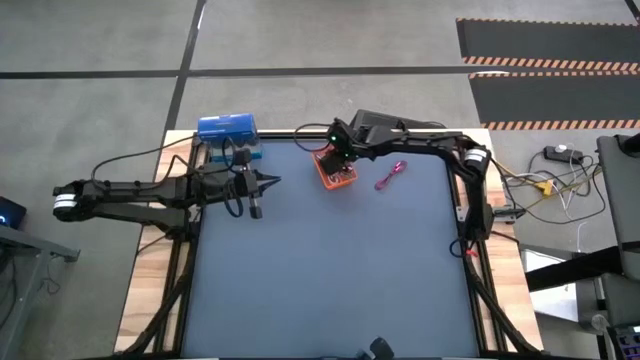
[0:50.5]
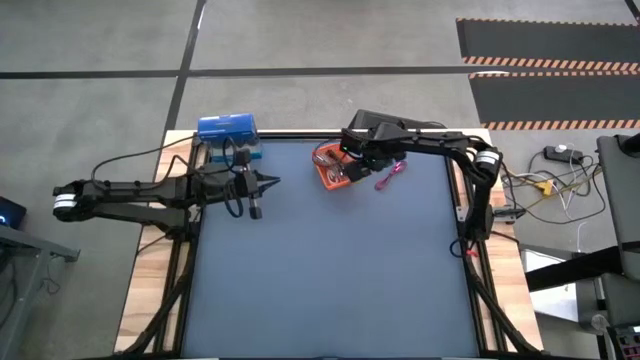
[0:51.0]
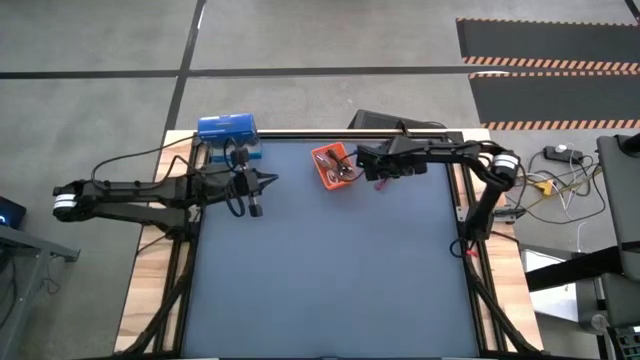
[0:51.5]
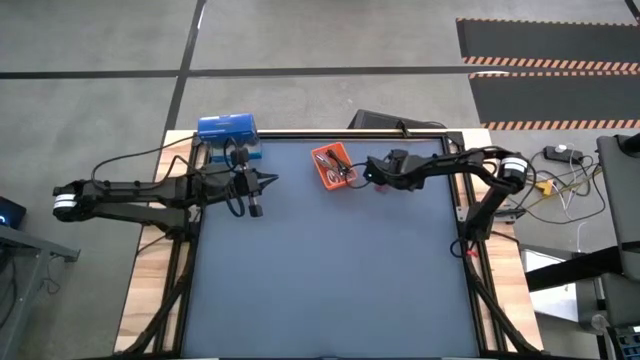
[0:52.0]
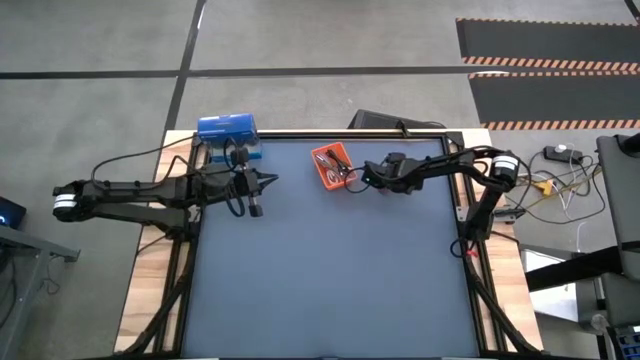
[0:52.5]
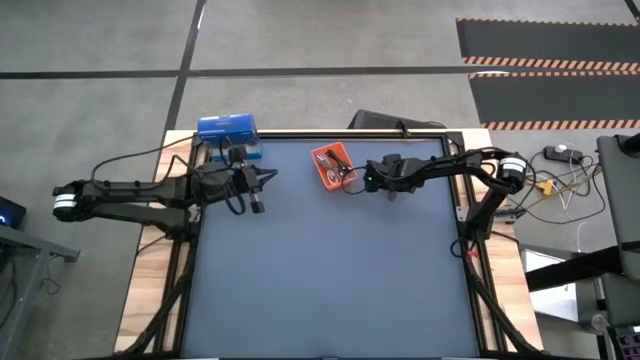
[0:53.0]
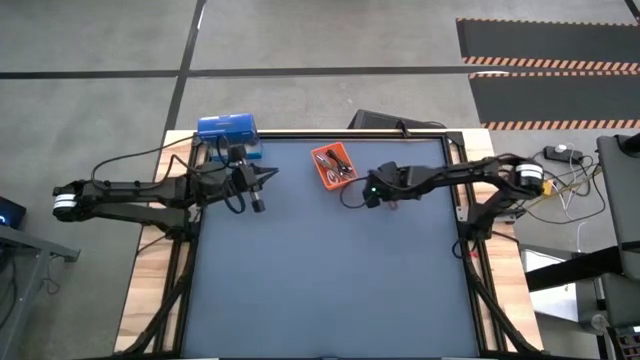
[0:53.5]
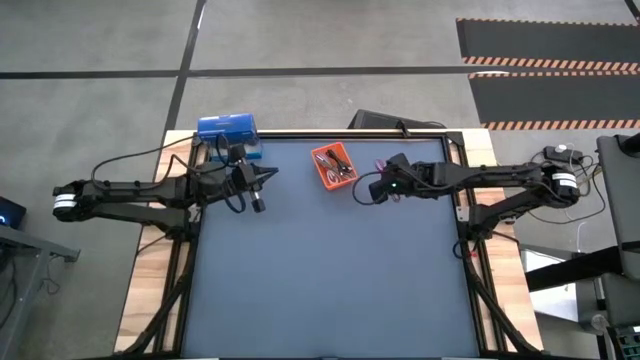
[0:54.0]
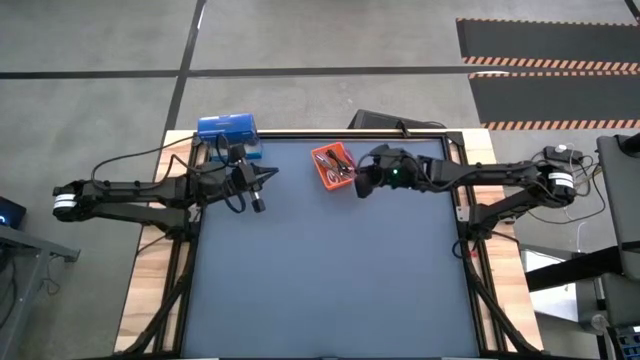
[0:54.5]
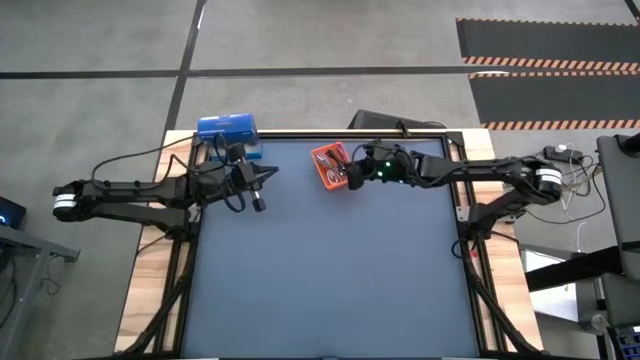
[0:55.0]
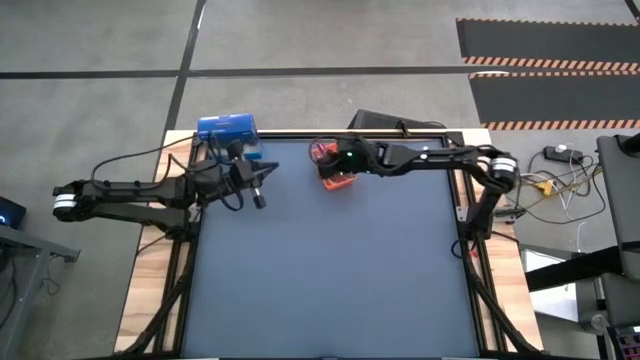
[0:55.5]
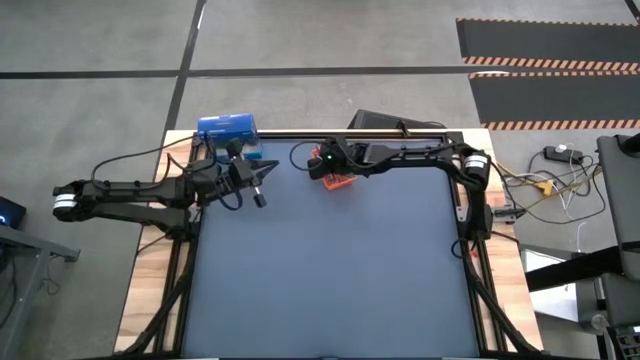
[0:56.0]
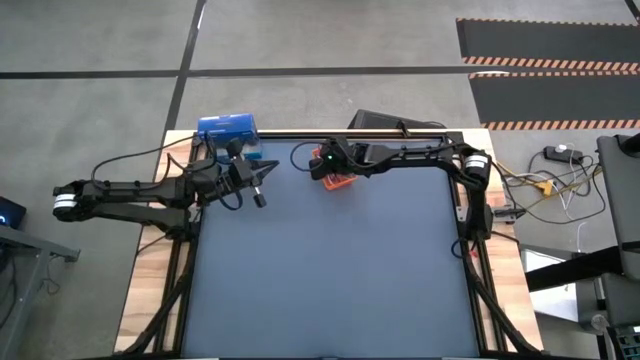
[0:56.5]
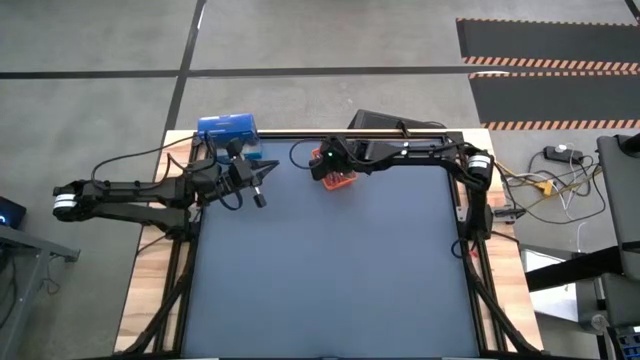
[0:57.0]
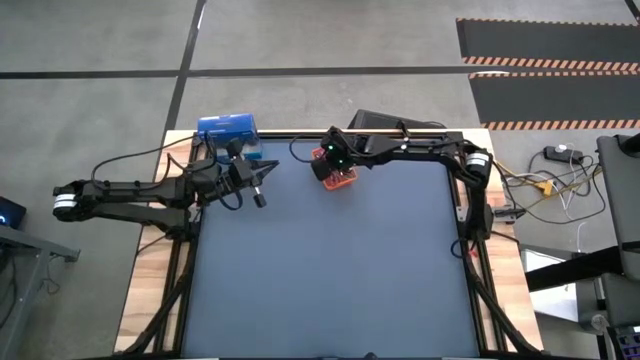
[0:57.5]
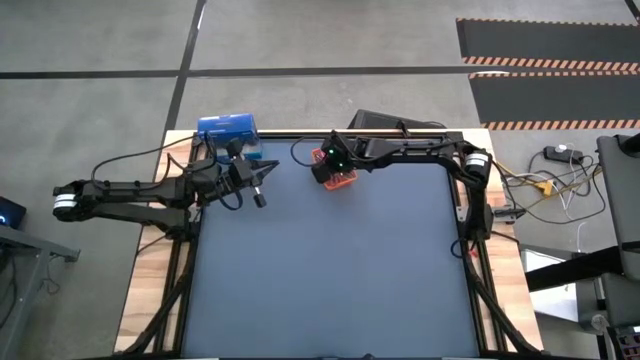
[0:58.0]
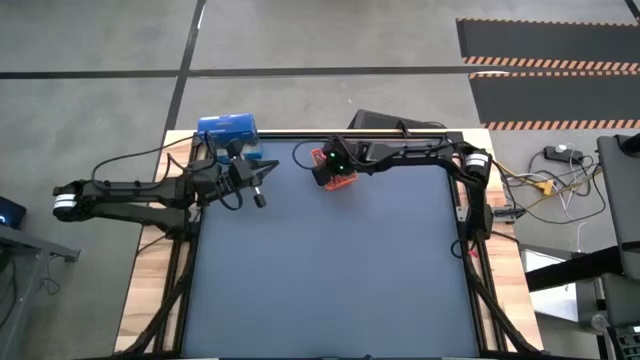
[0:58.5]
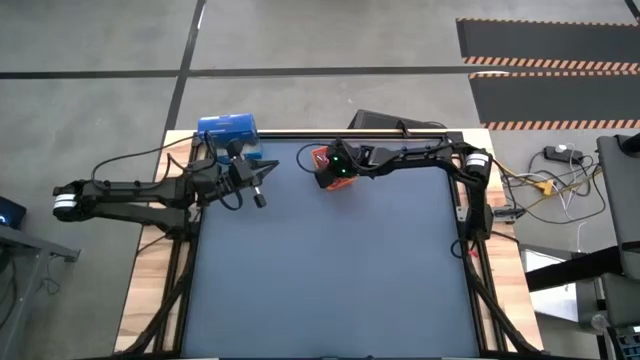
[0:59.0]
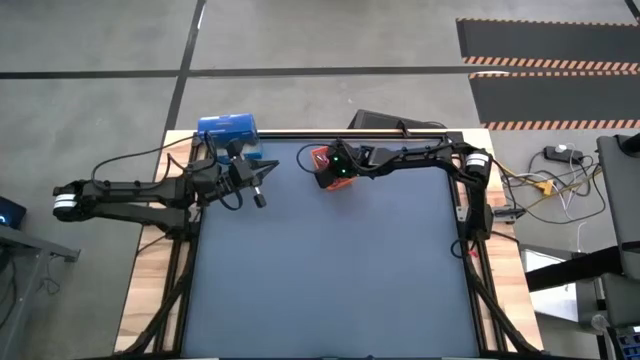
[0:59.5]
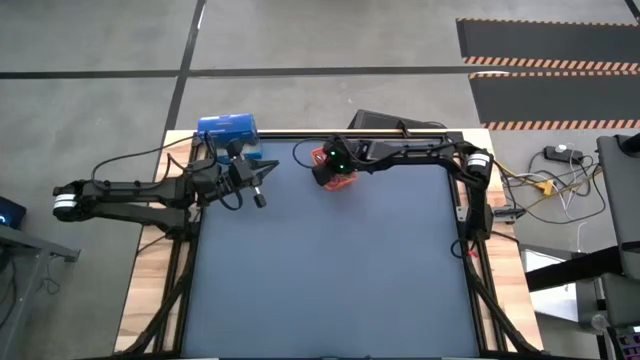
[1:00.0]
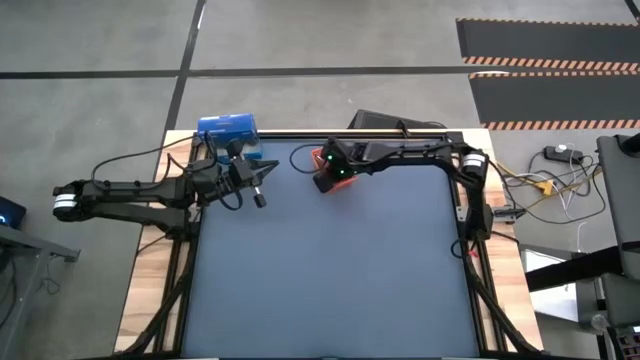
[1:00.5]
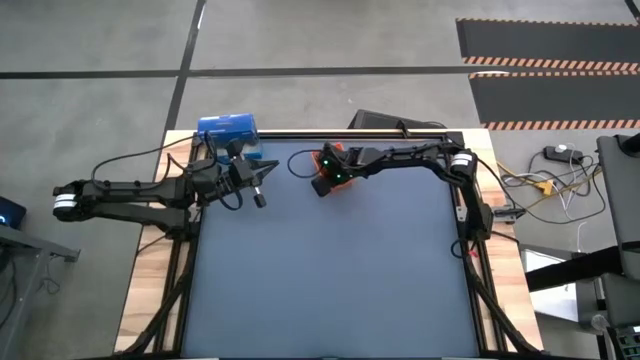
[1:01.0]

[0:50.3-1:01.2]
Task: Pick and place USB-C Cables
Put the black pink charger cable into the orange bin

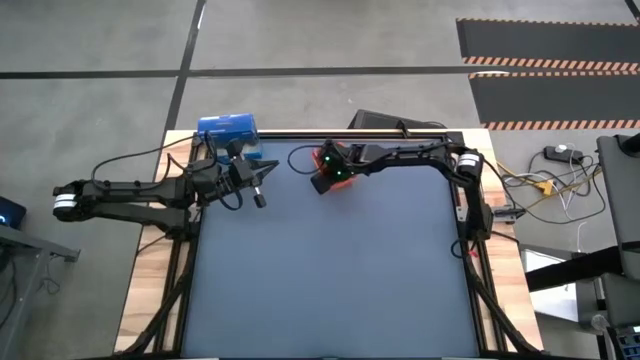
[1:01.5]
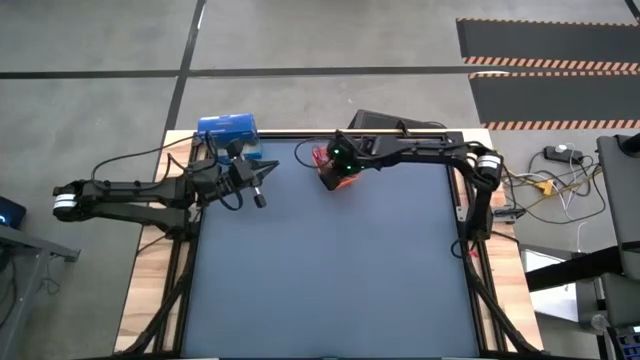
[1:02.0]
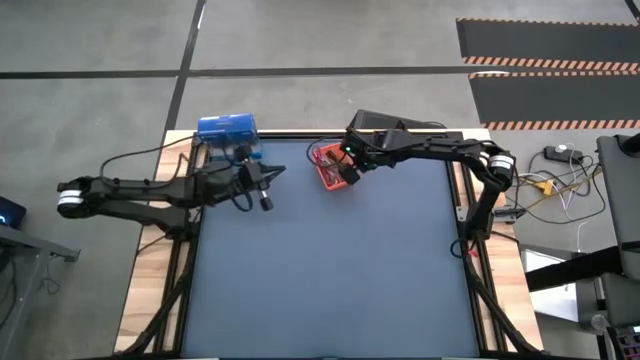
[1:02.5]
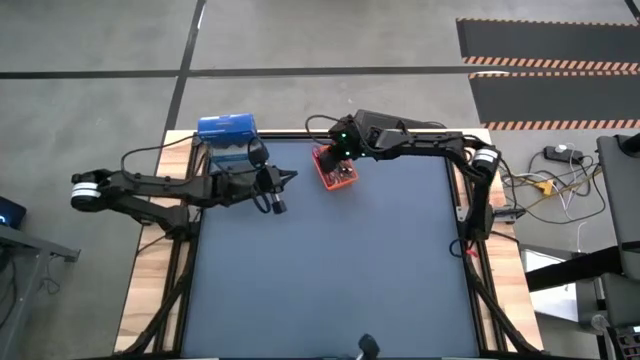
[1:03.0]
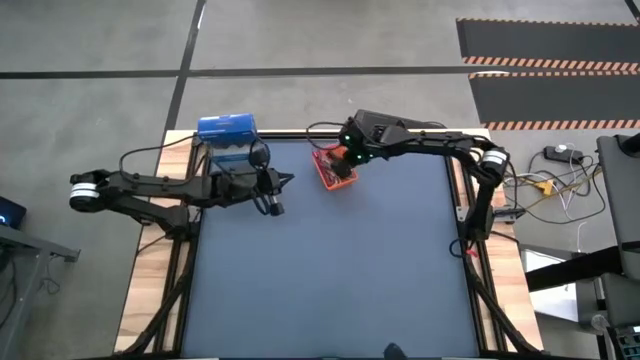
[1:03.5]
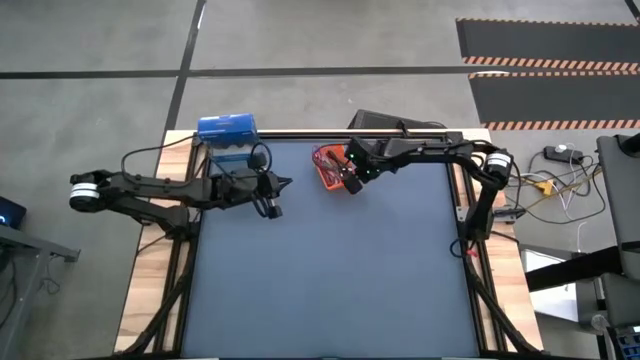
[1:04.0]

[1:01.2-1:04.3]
Adjust the orange bin

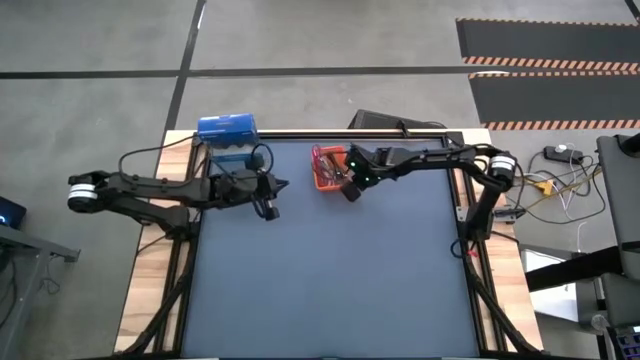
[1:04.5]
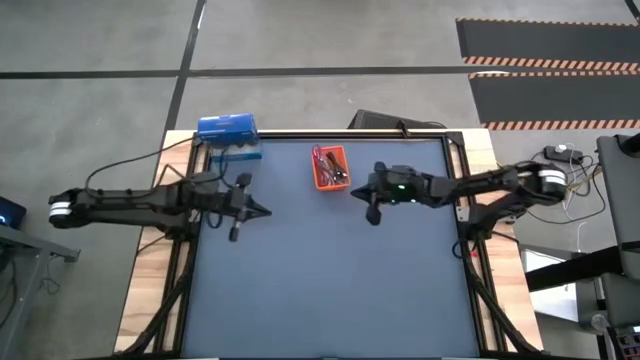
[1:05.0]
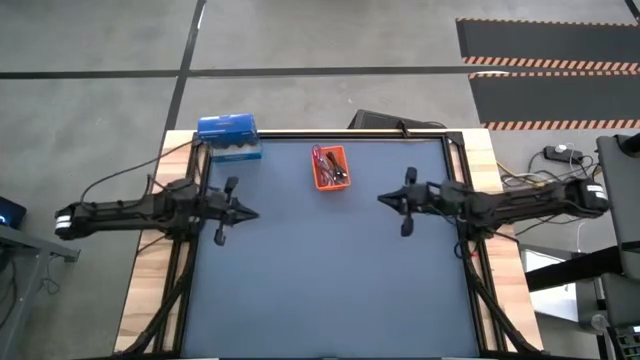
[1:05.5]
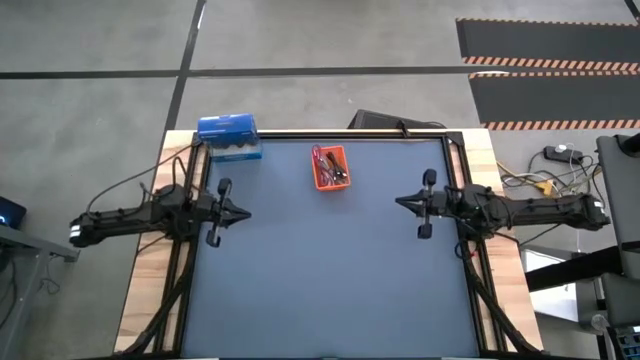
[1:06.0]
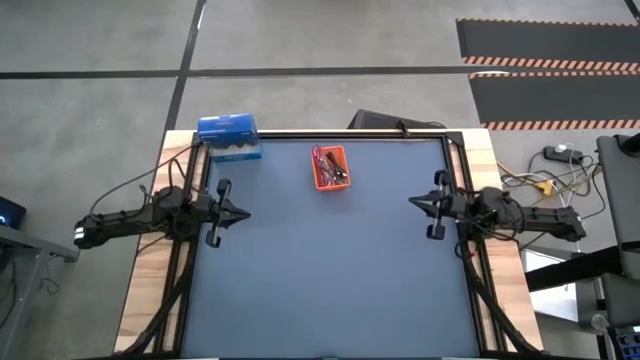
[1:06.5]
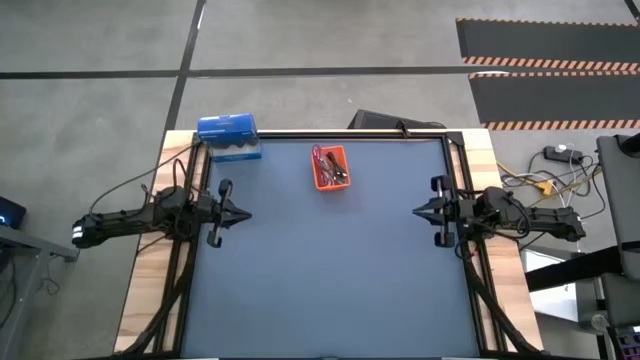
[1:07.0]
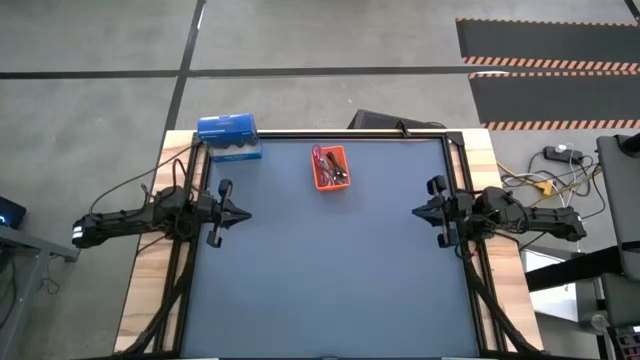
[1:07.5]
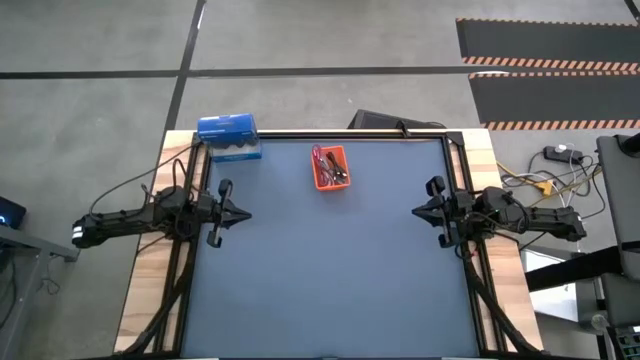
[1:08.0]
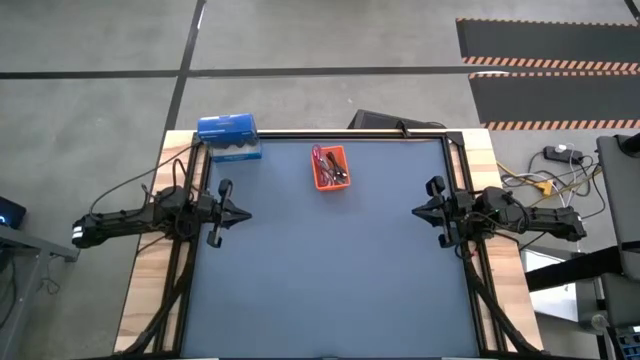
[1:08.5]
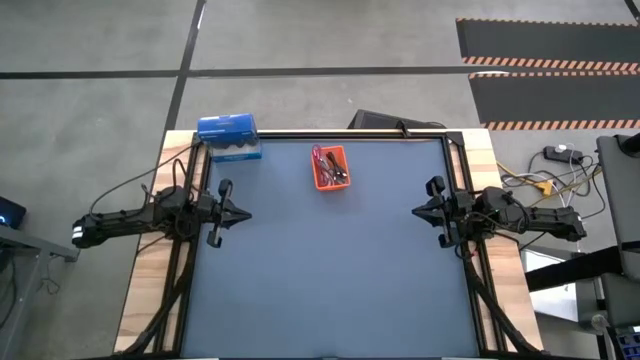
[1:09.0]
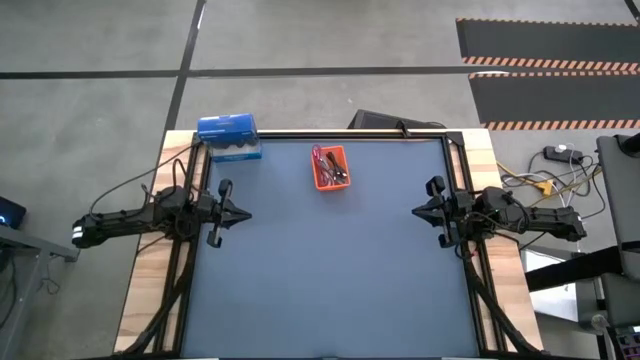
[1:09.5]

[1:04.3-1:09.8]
Return to Home Position

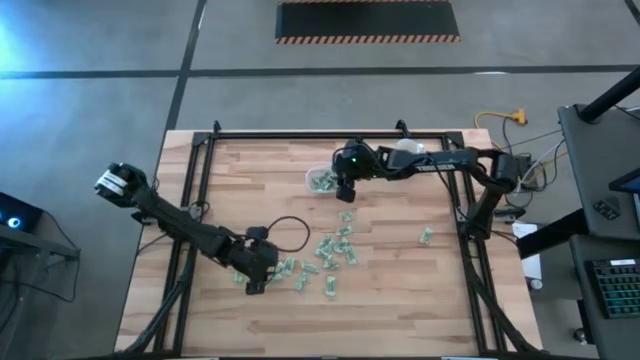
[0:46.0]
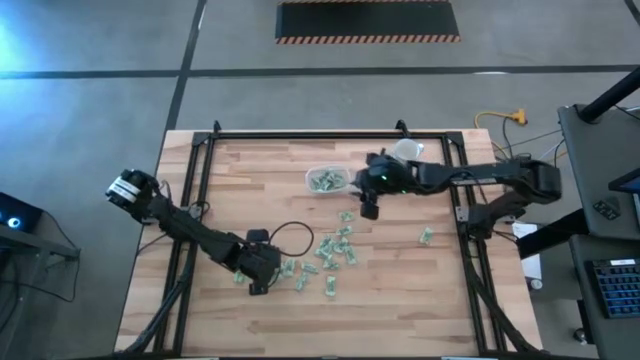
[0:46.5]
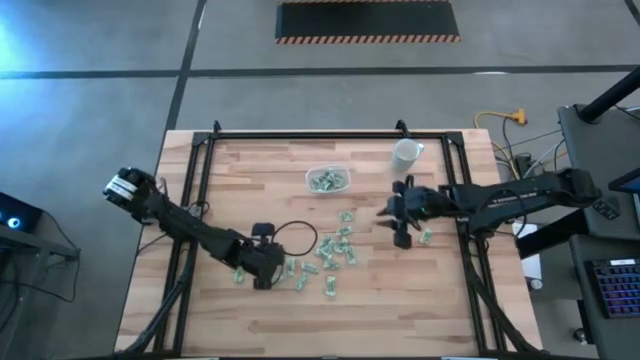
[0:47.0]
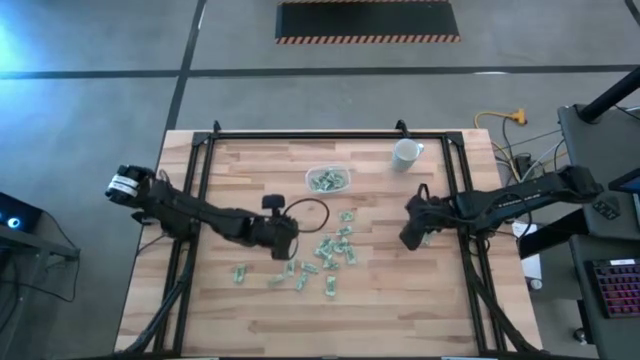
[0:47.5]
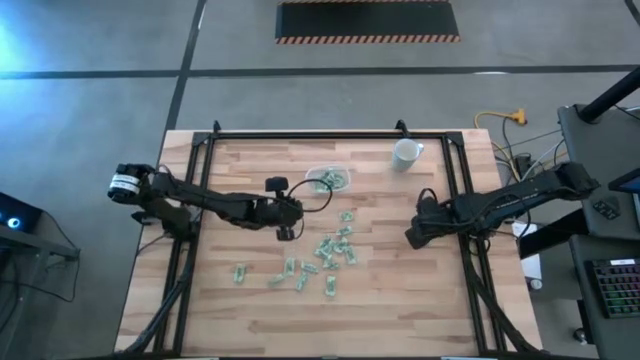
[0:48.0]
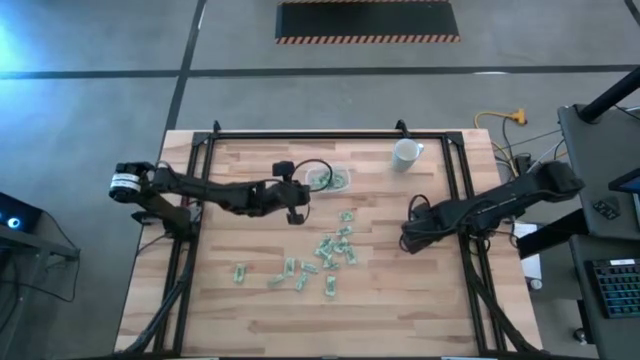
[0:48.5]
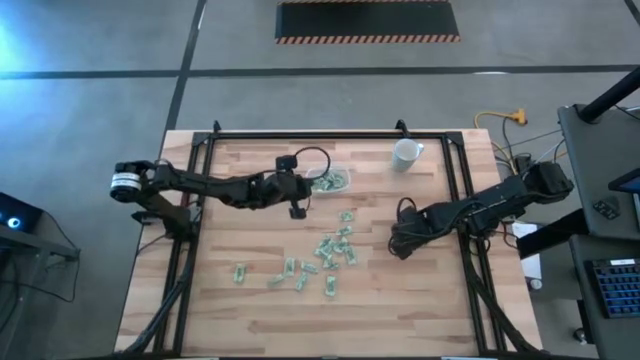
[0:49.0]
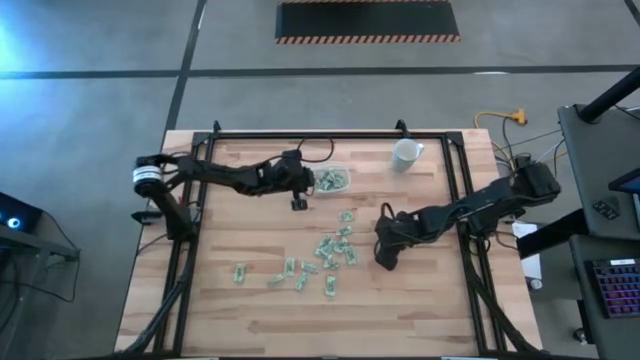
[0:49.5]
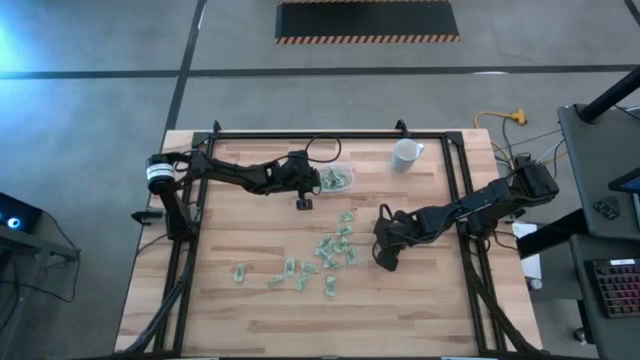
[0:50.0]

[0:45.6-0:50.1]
Task: Pick and place Stevia / Truvia into bins
Put the stevia packet into the transparent container
